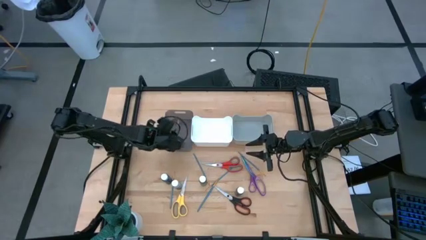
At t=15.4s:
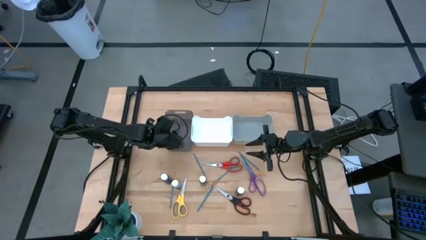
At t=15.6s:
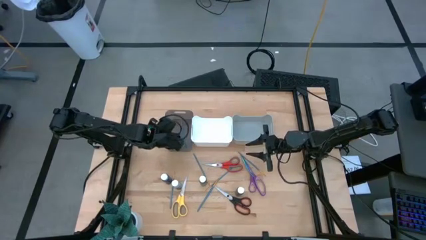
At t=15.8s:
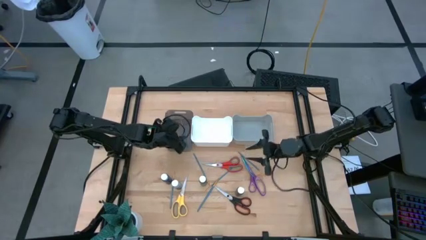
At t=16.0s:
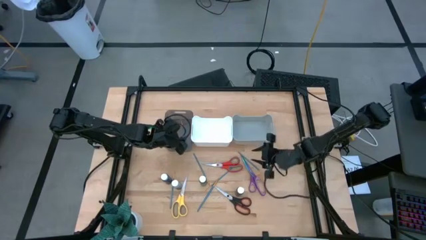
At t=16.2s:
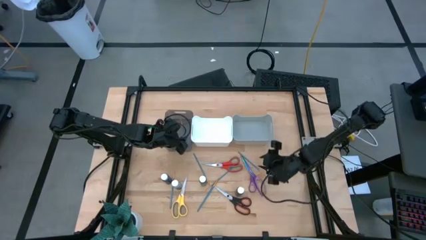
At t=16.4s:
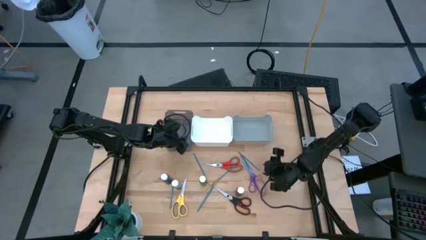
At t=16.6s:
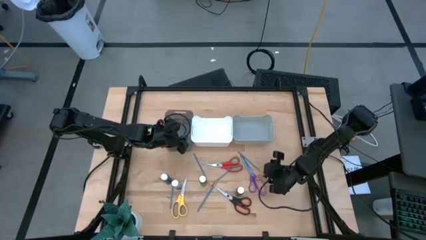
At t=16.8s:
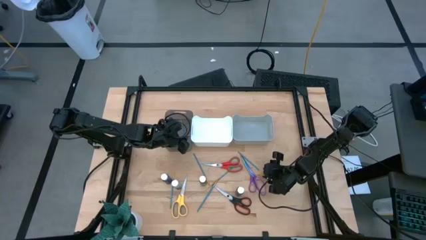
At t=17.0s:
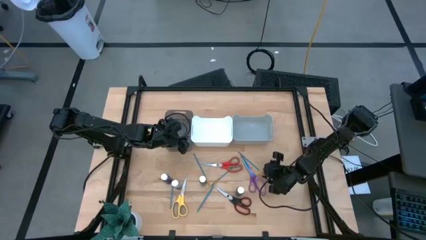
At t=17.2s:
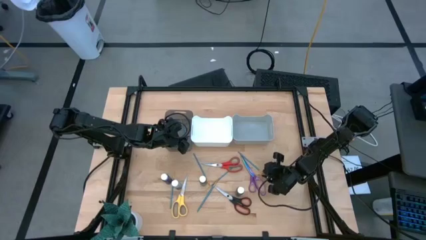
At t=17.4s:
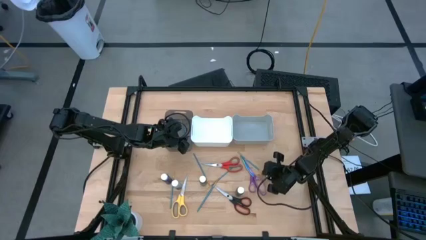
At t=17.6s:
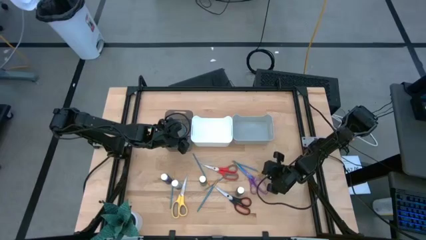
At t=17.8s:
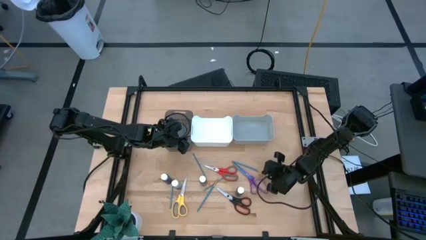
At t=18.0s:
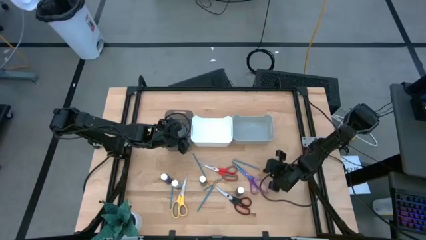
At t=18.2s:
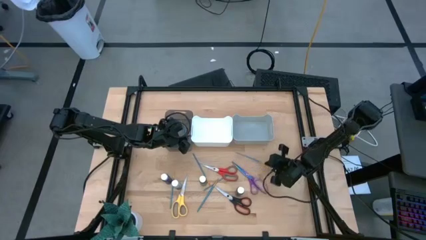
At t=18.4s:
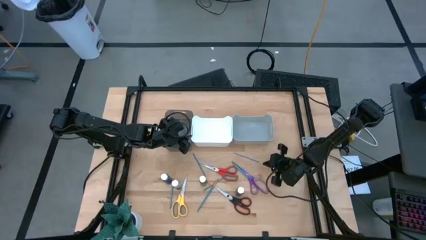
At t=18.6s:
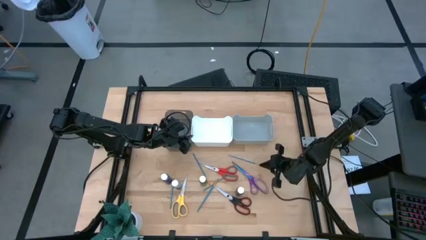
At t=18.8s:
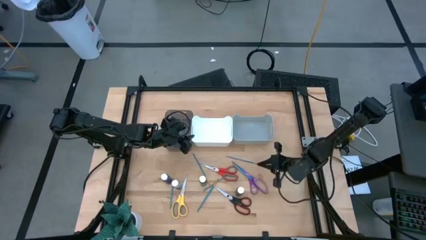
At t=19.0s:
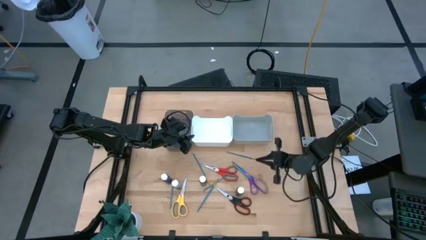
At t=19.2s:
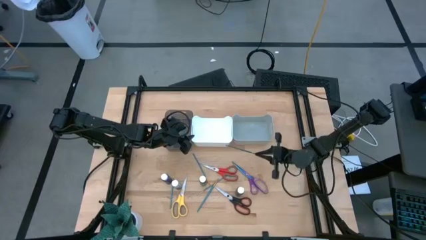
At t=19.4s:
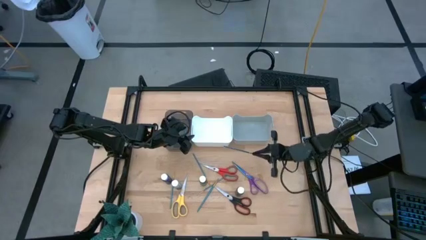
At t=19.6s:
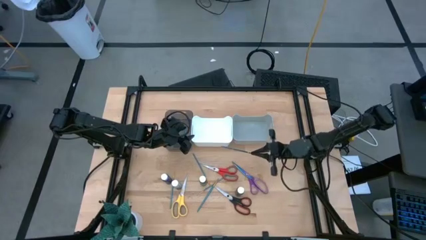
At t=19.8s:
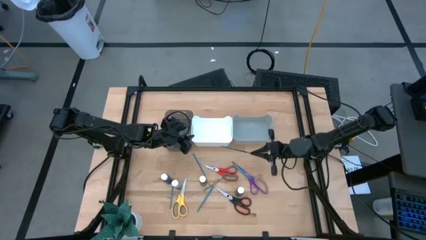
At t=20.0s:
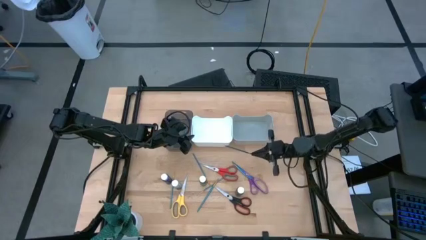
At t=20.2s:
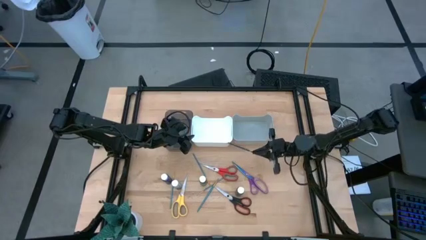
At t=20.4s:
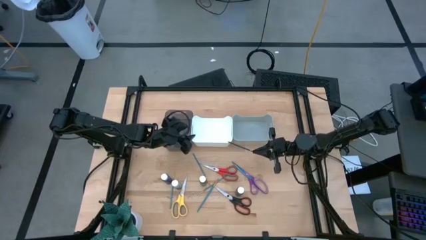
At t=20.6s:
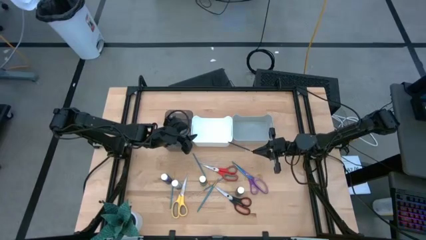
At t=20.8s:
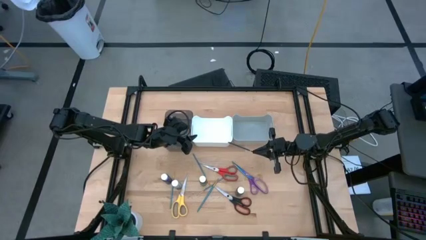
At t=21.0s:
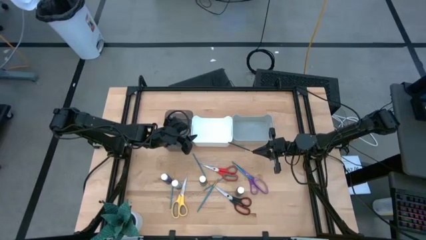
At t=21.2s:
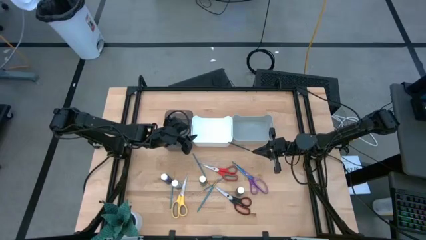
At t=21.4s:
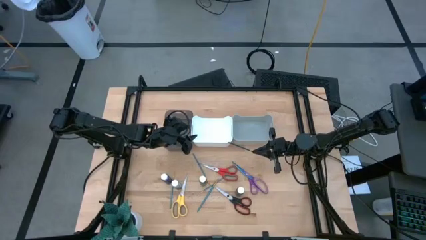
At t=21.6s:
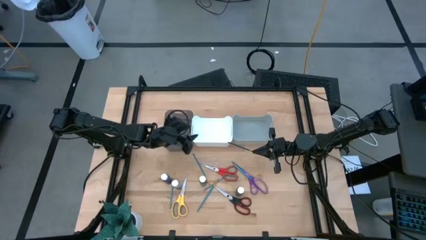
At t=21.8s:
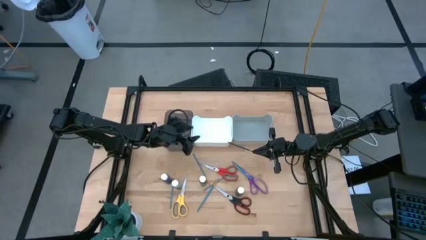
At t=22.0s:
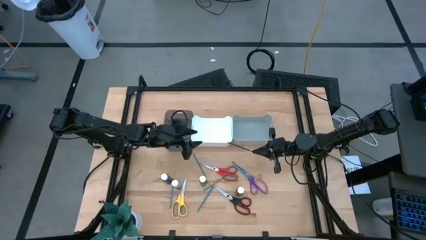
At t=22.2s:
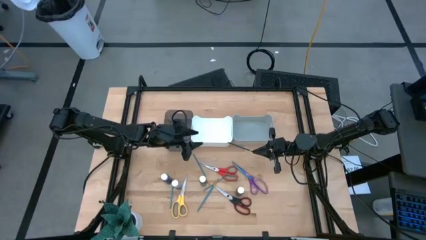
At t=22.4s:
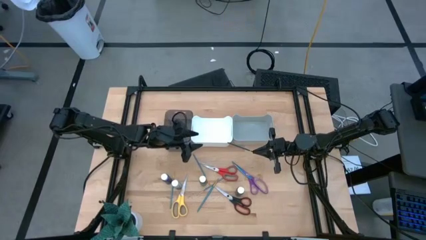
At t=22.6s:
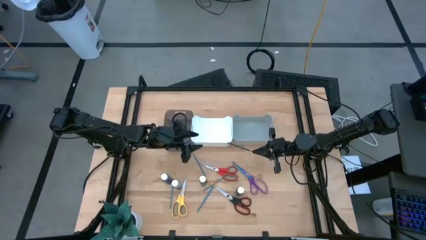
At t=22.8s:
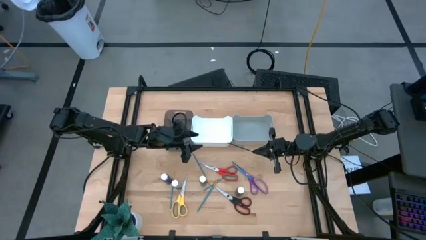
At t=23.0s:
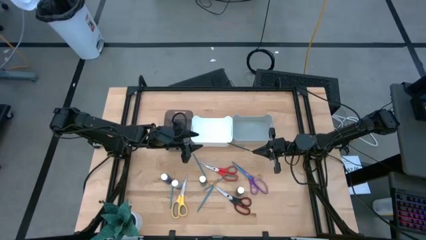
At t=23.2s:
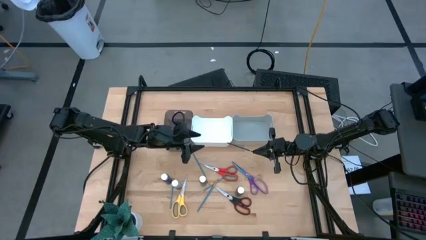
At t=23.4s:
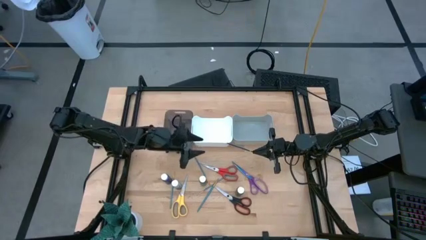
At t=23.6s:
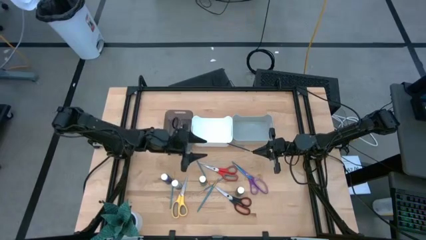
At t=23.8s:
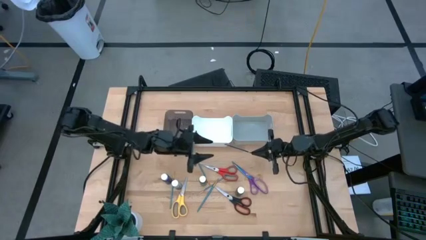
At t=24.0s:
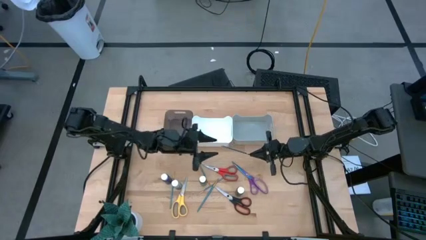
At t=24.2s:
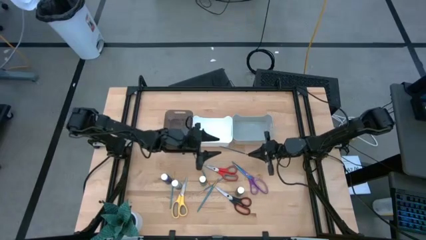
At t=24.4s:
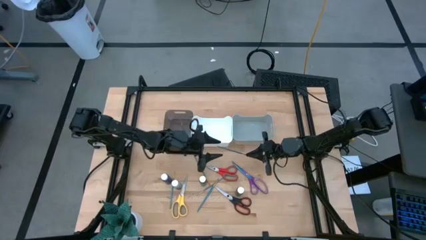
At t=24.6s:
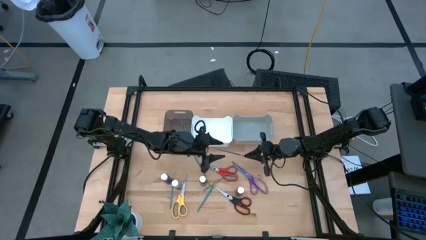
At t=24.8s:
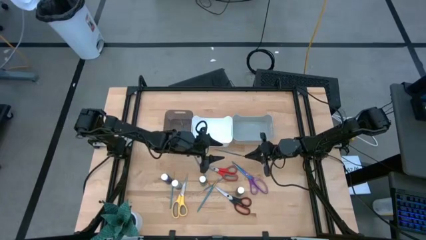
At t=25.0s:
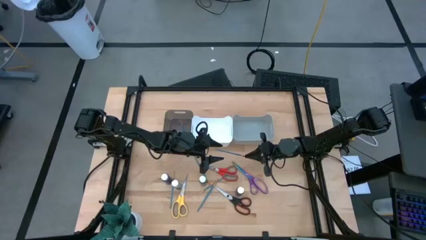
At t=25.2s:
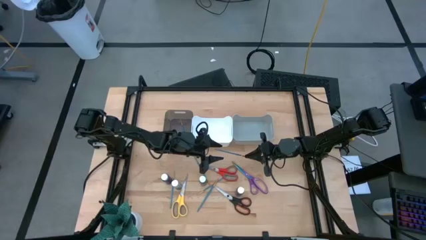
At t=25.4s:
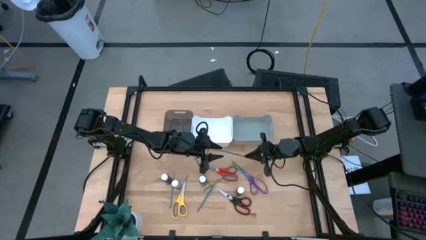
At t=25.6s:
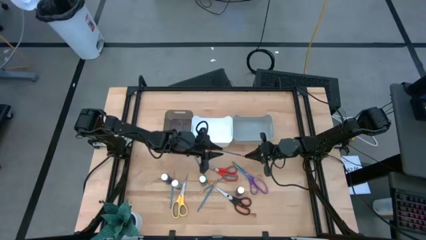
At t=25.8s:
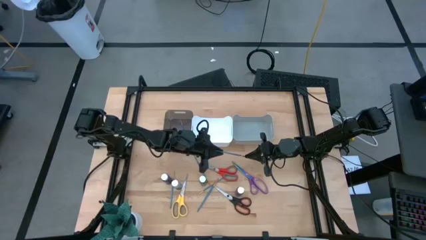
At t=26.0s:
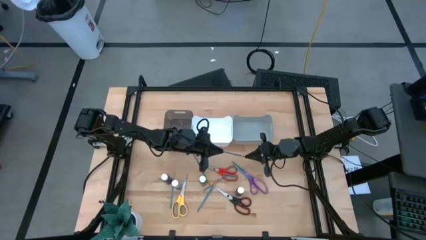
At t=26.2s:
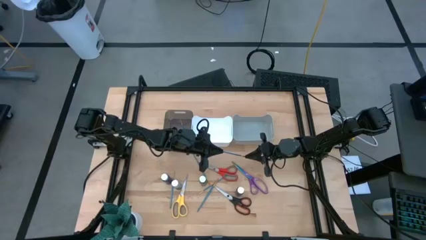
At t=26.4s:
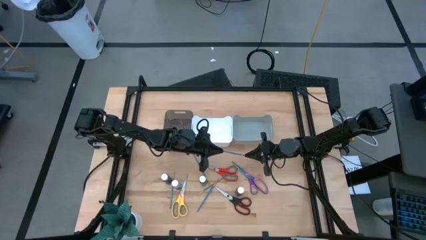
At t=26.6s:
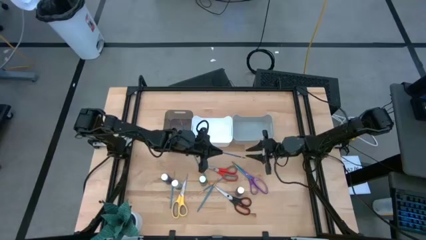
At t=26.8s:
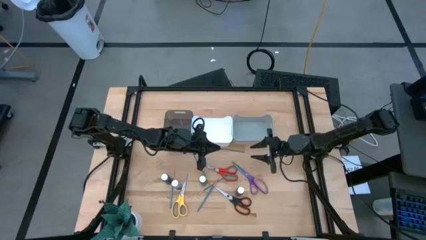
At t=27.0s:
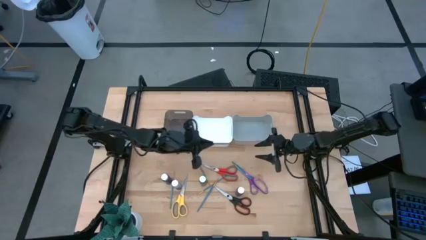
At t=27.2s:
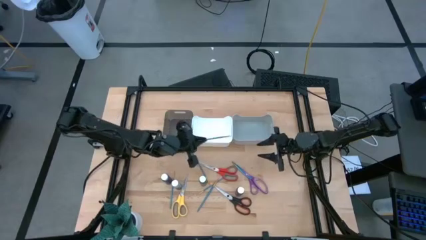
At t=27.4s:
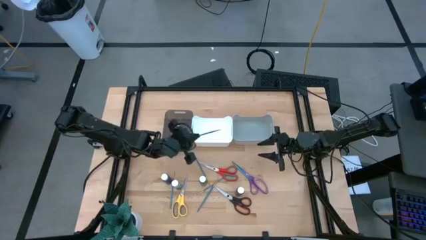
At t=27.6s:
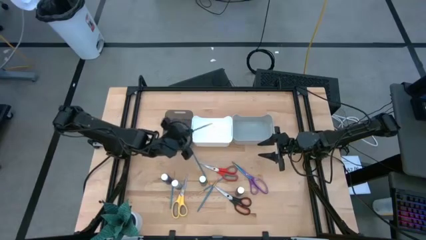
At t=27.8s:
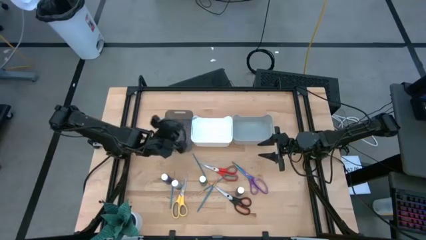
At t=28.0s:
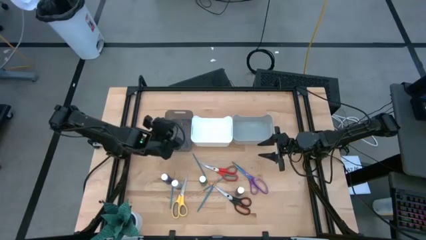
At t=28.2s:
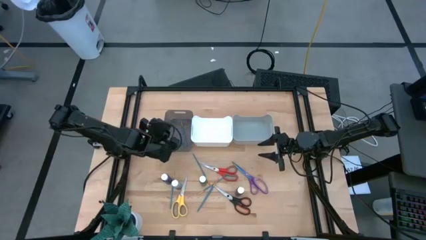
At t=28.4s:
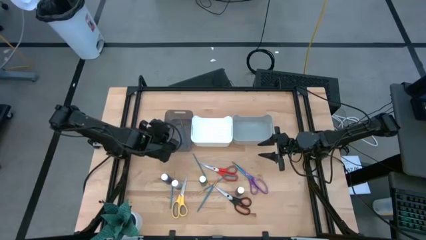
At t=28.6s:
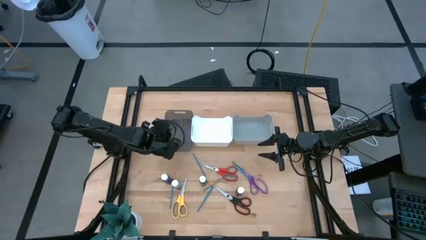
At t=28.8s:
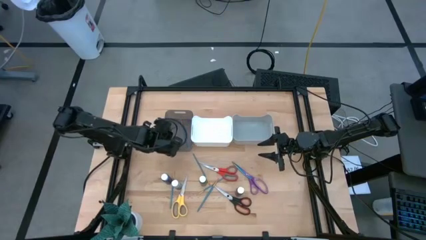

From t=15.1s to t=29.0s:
Task: Pick & Place Paint Supplies
Put the blue paint brush into the black bin
